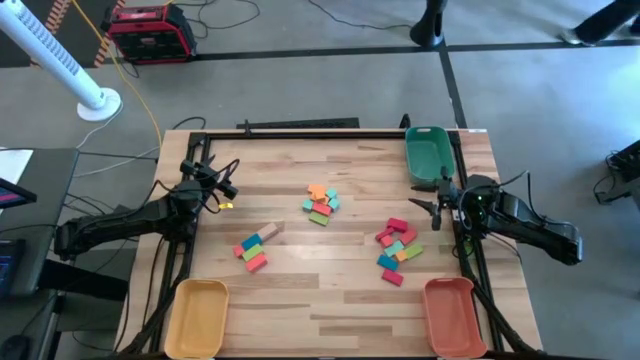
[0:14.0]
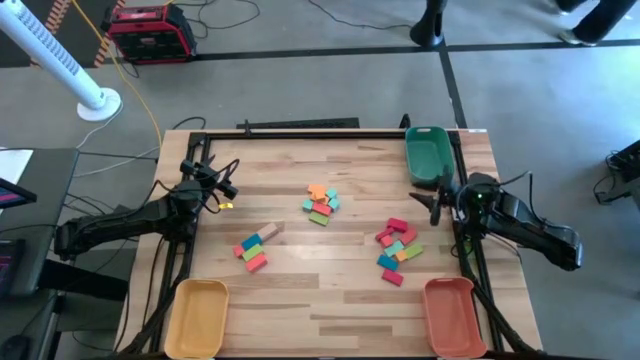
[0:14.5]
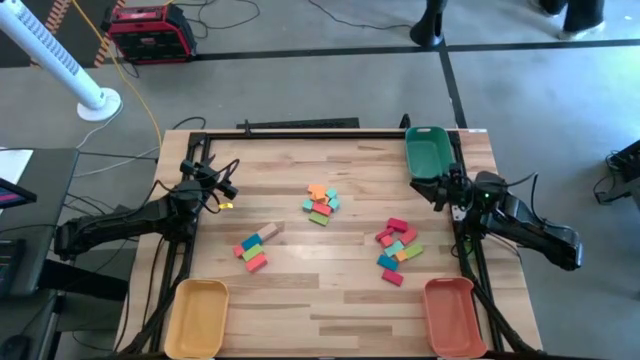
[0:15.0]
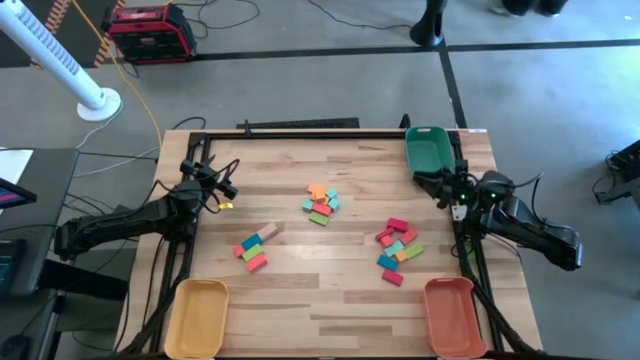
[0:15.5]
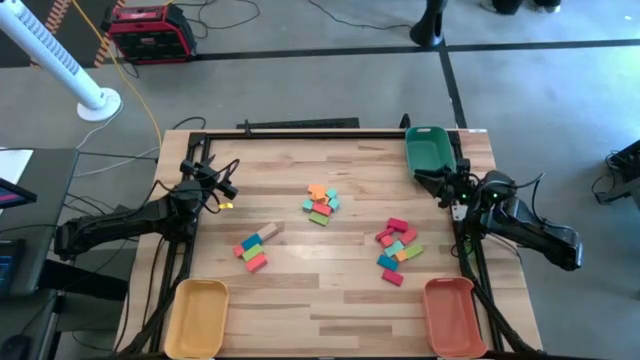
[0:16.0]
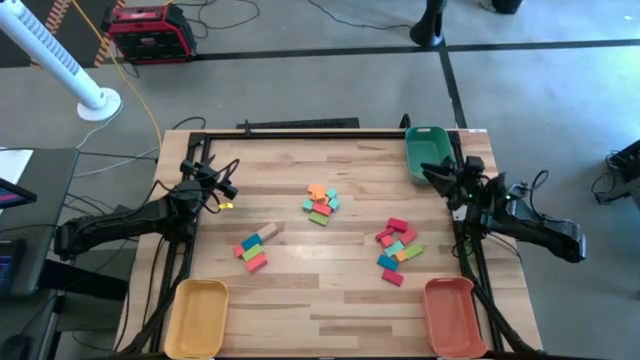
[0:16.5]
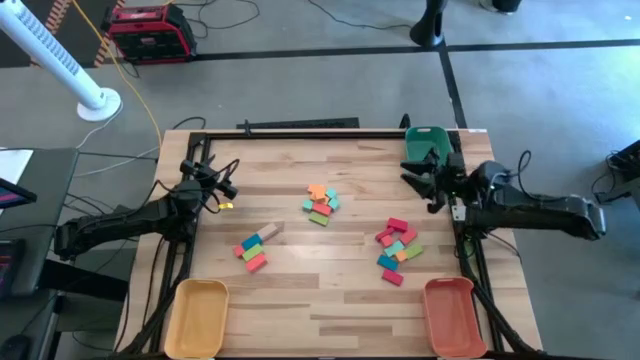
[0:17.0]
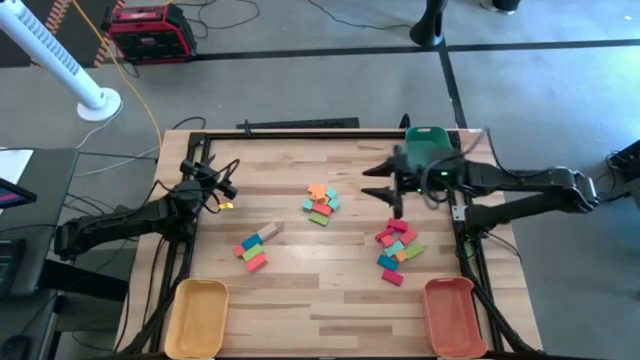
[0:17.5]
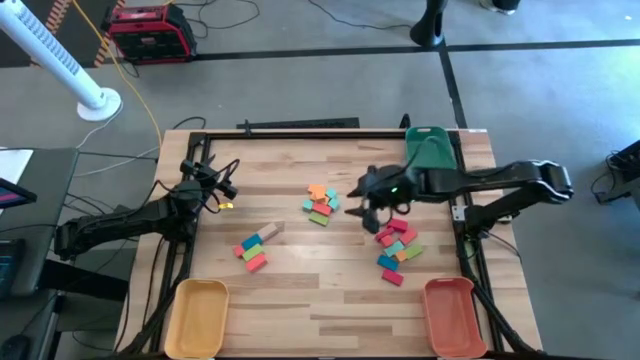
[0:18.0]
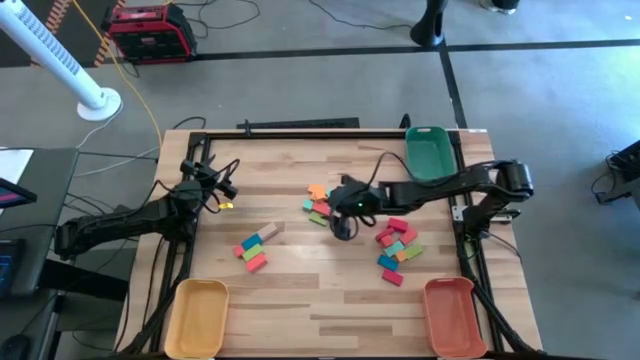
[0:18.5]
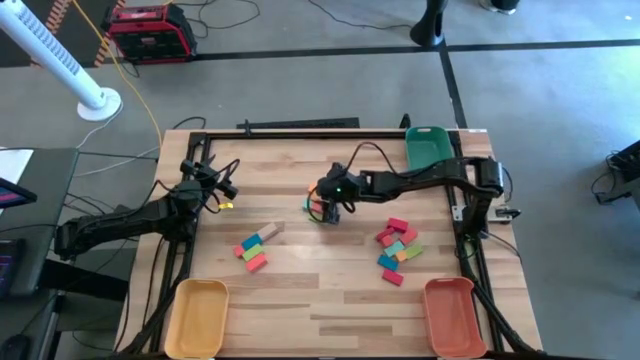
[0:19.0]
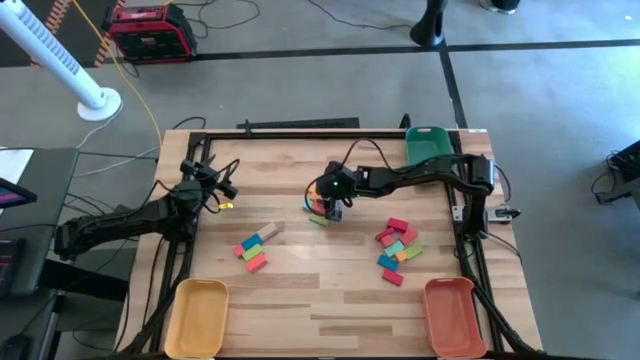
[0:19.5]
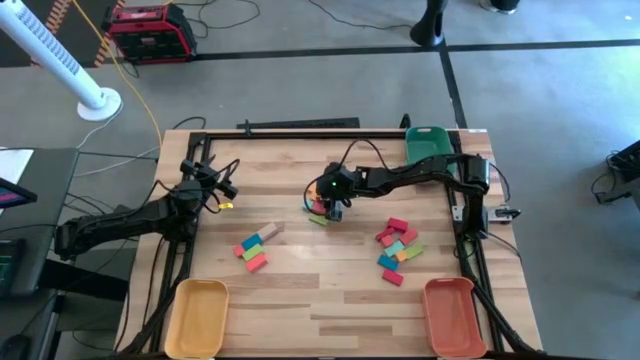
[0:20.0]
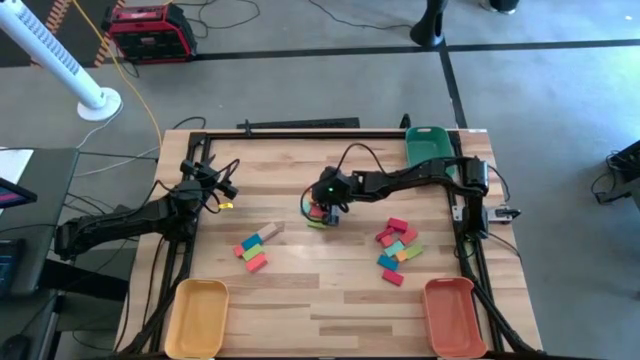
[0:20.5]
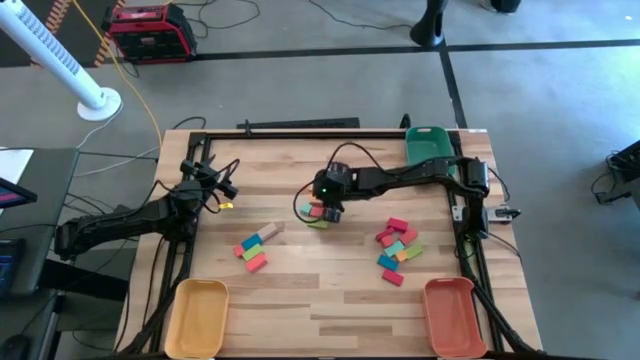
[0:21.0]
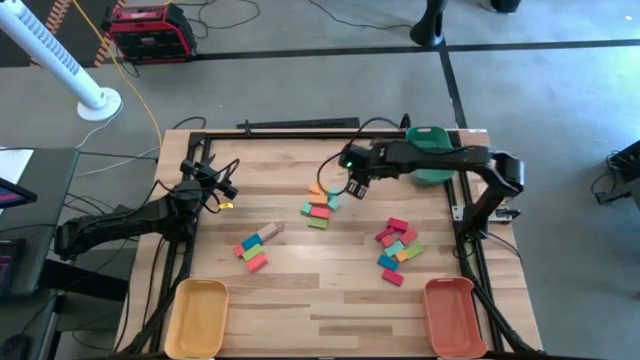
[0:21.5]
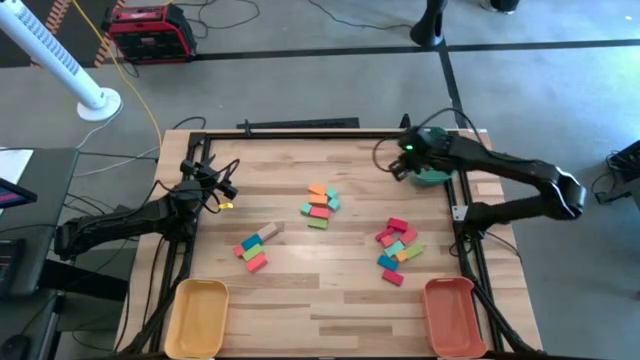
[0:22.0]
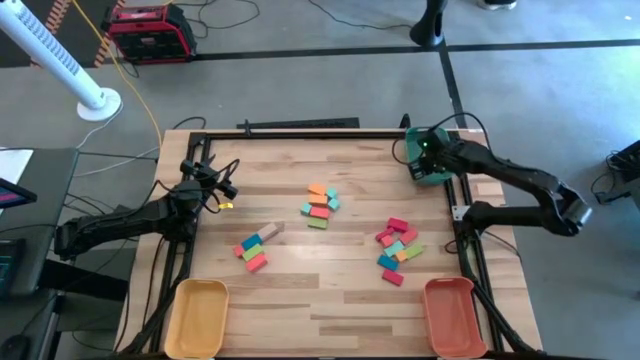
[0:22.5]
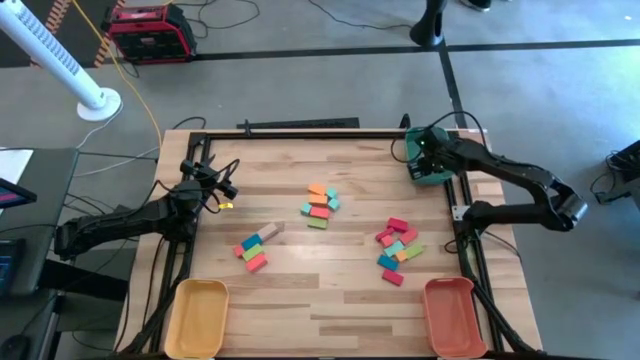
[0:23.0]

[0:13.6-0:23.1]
Task: Sort blocks by size
Put the yellow square block into the green bin

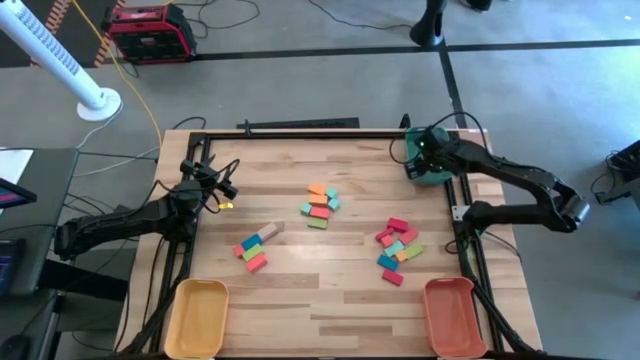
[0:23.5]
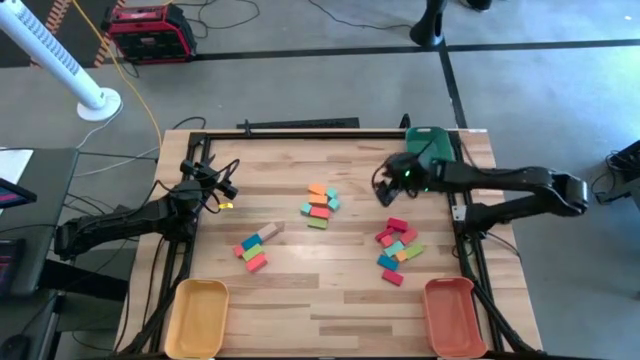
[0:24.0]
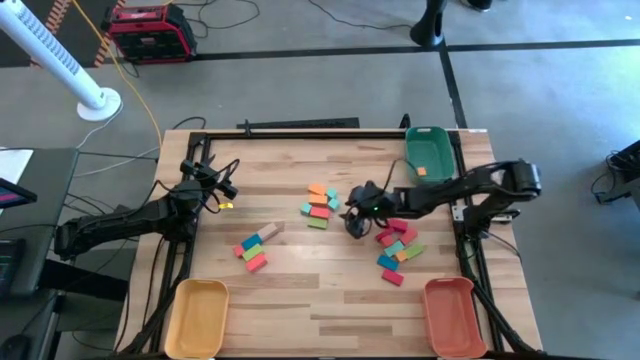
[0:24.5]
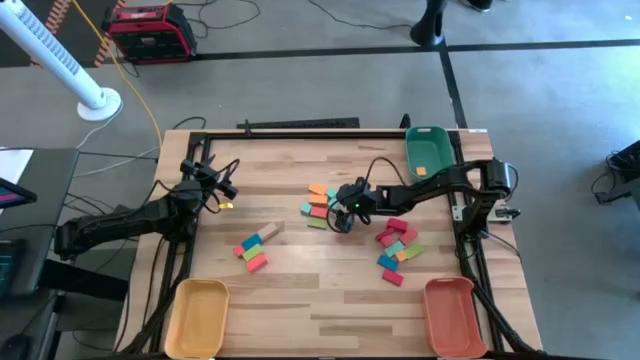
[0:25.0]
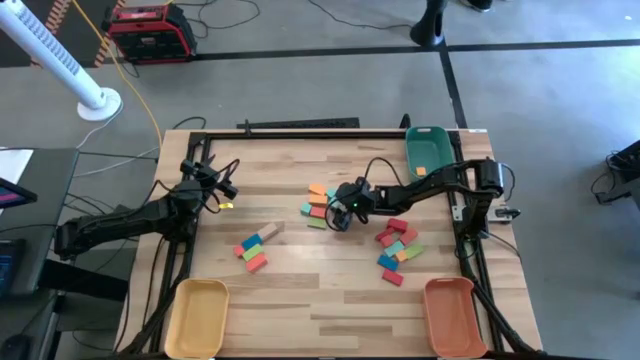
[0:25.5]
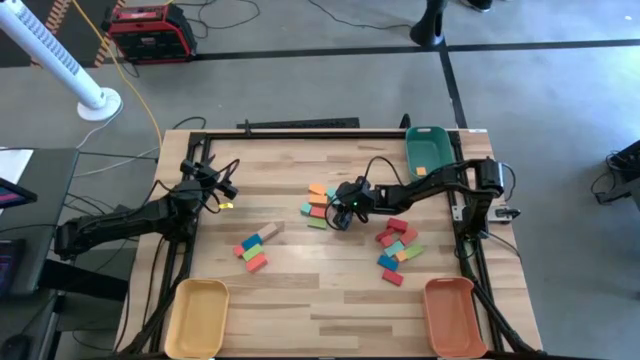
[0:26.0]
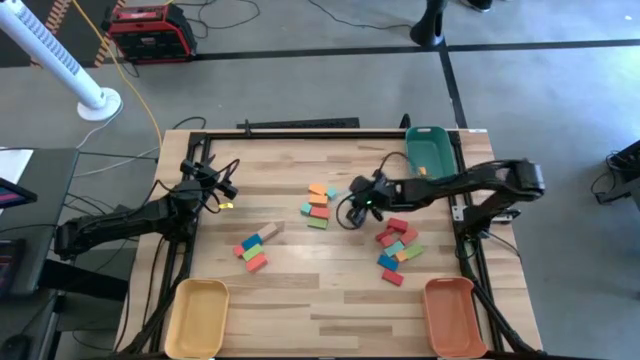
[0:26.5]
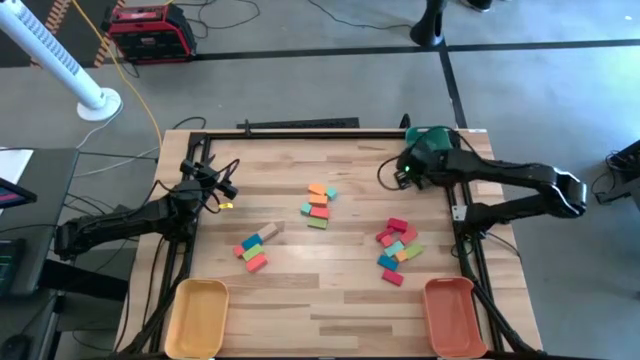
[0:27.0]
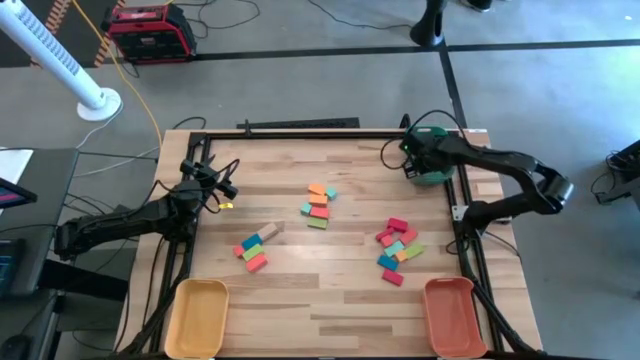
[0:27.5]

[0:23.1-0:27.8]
Put the blue square block into the green bin

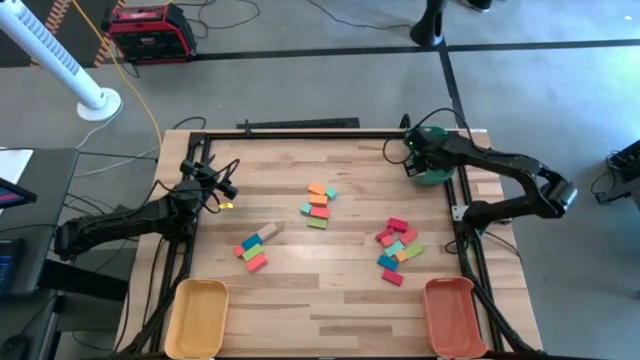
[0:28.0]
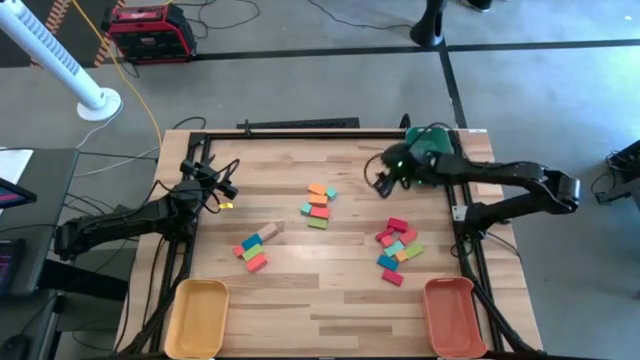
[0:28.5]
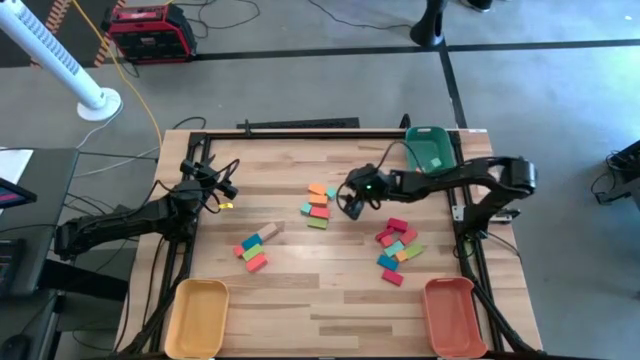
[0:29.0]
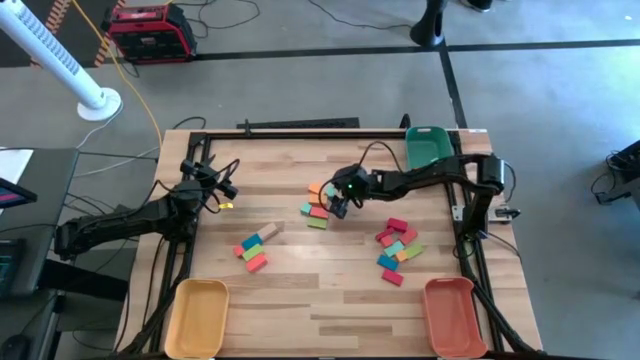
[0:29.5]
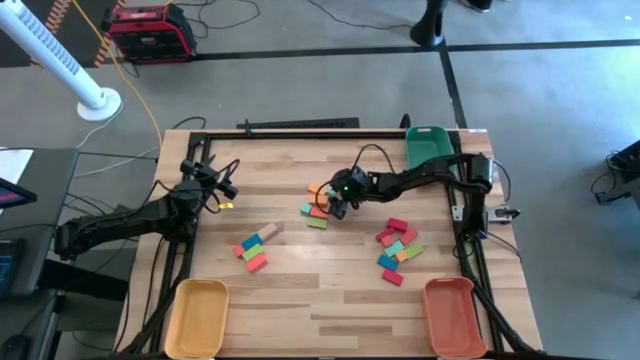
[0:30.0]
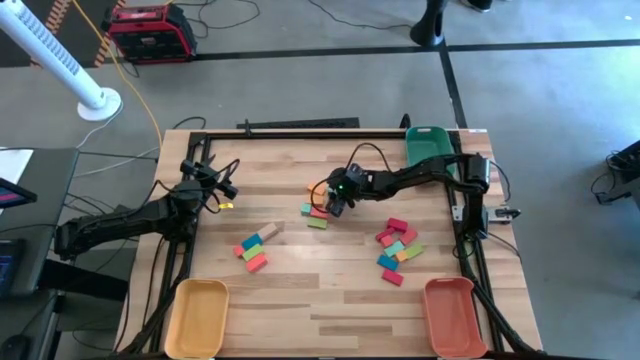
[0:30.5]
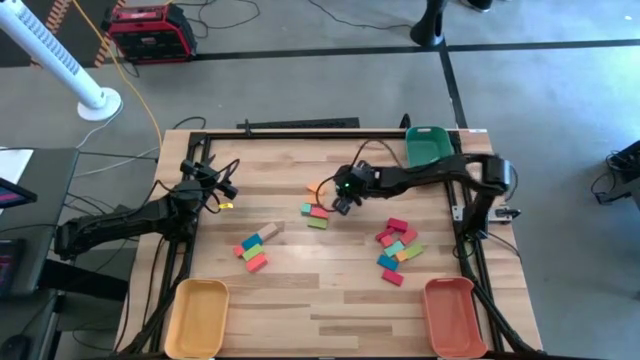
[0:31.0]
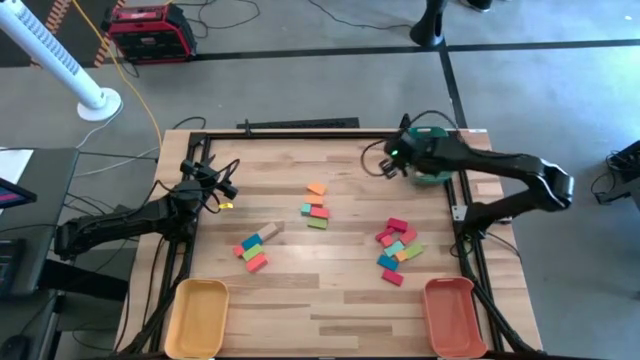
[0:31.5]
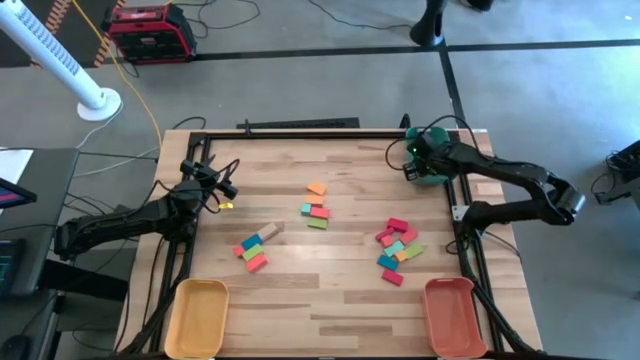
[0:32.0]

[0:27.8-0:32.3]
Put the blue square block into the green bin

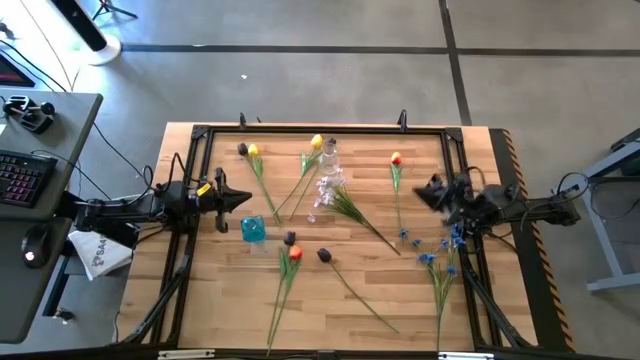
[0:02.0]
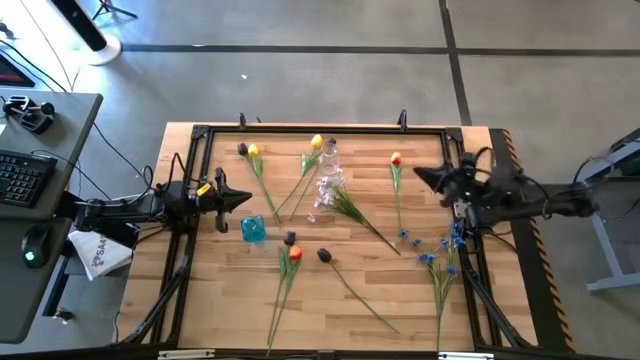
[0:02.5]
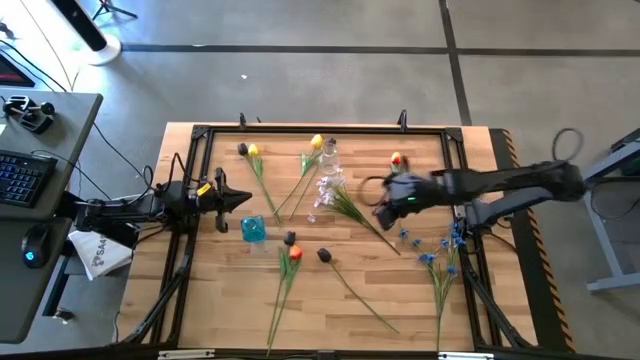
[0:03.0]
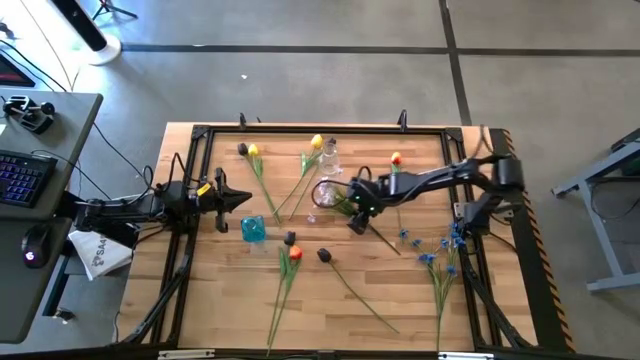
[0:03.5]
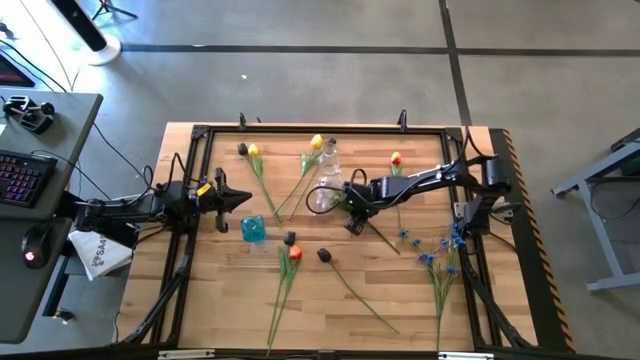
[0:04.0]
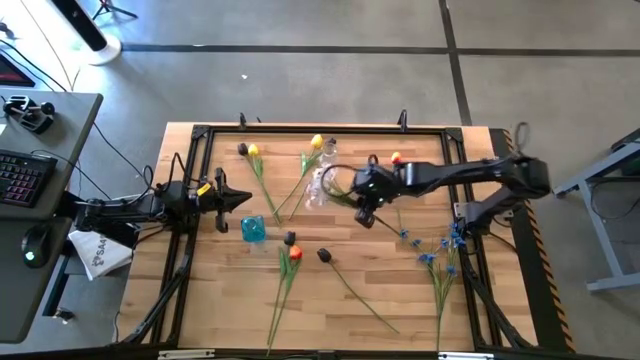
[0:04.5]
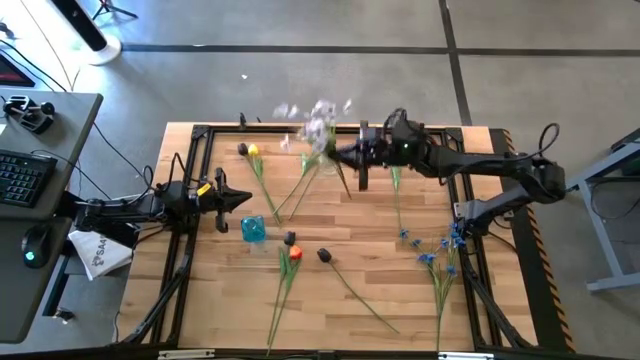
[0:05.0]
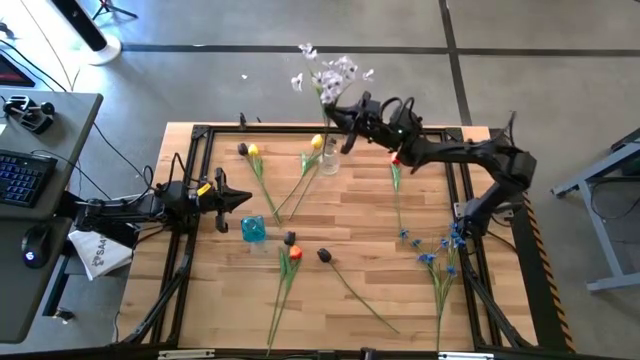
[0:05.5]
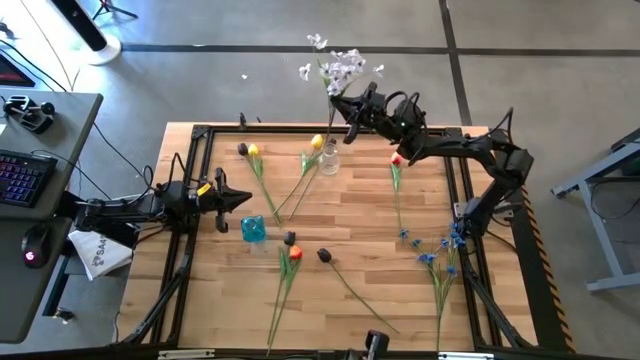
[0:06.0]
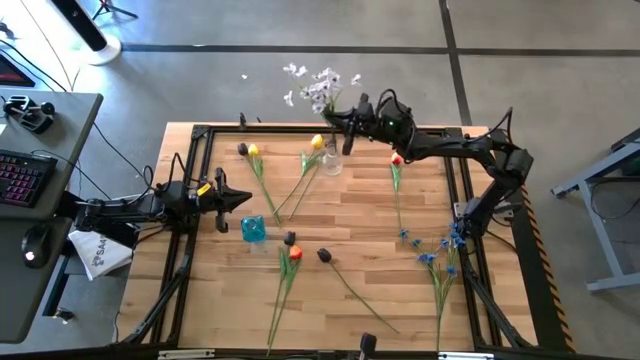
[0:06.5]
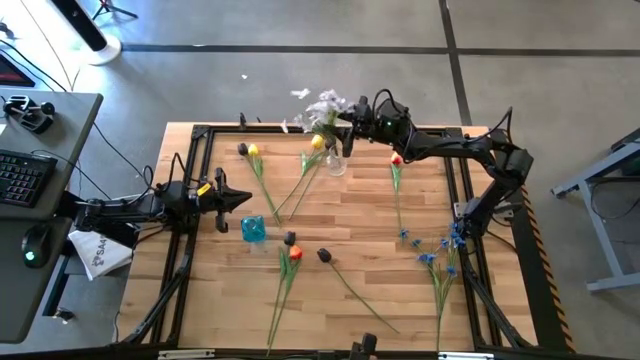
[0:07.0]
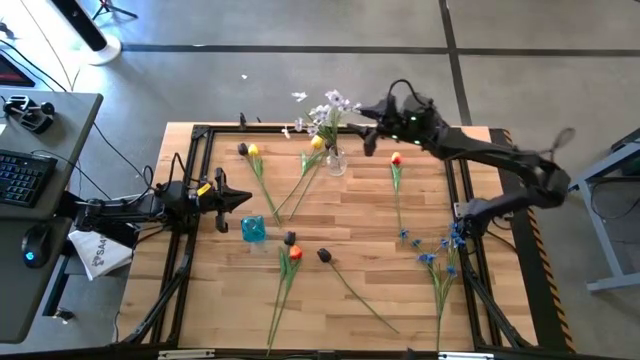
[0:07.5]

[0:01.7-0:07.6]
Task: Sort flowers into vase by color
Put the white flowers into the transparent vase
